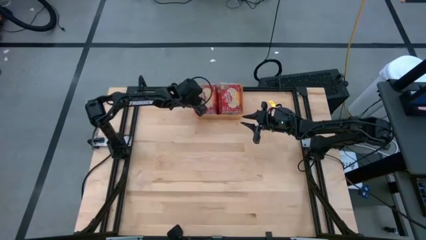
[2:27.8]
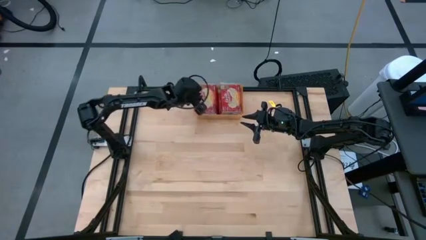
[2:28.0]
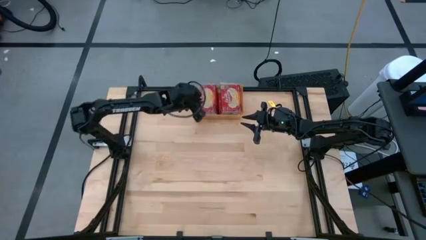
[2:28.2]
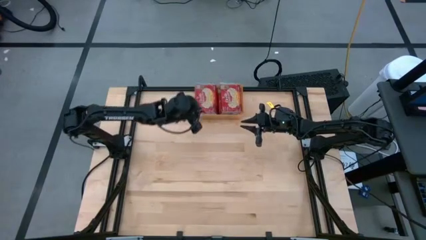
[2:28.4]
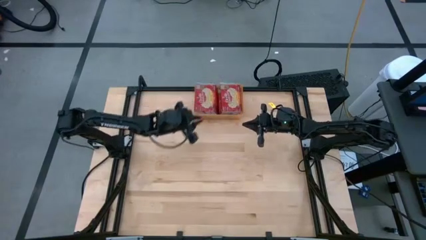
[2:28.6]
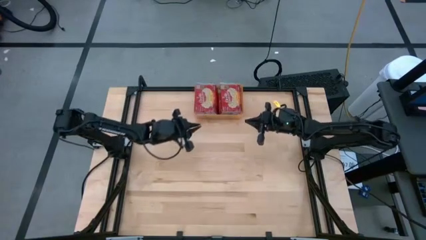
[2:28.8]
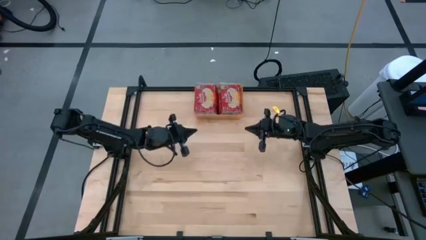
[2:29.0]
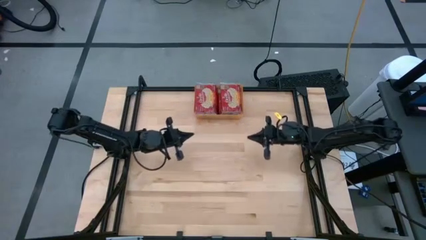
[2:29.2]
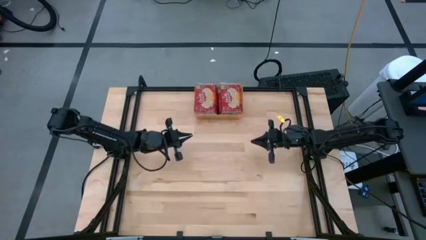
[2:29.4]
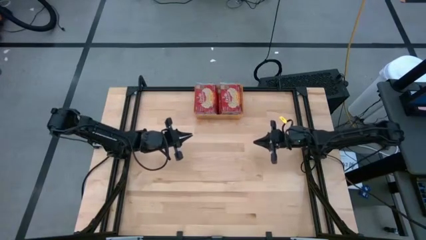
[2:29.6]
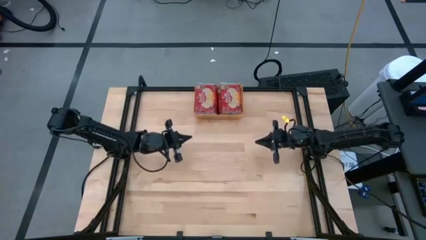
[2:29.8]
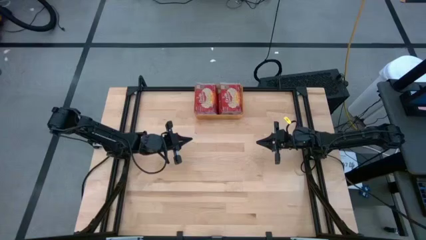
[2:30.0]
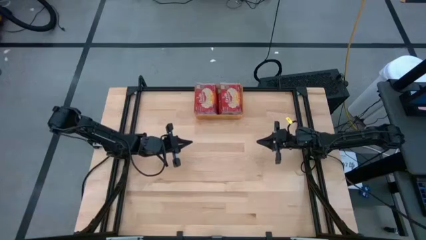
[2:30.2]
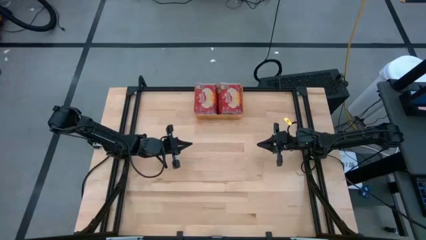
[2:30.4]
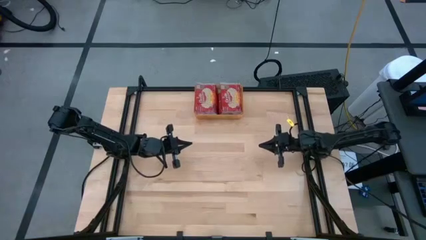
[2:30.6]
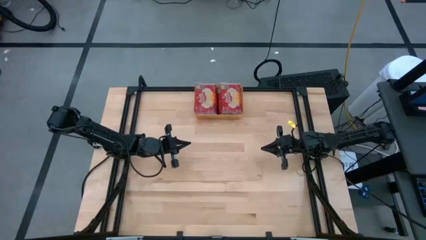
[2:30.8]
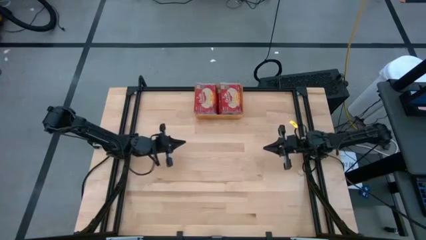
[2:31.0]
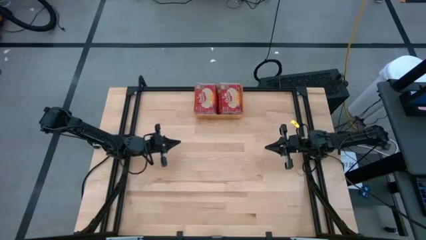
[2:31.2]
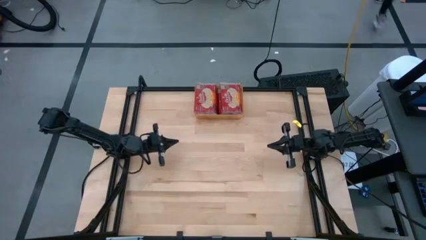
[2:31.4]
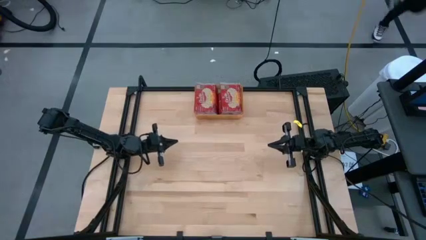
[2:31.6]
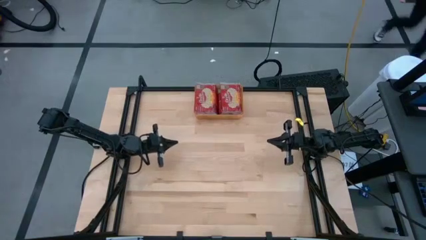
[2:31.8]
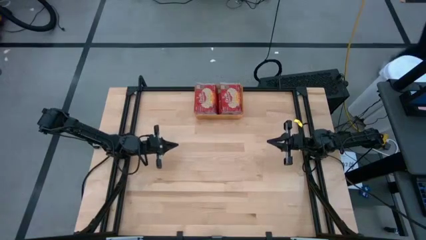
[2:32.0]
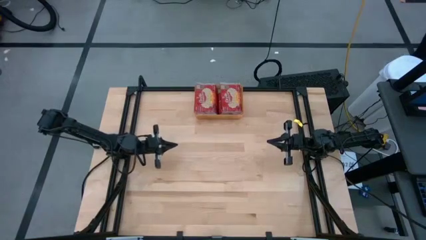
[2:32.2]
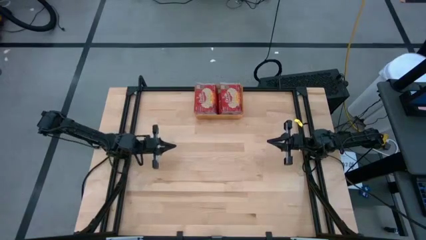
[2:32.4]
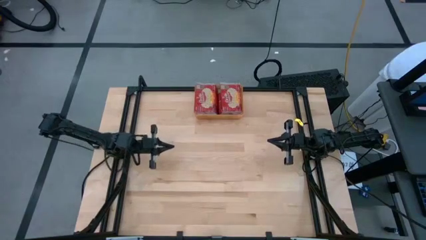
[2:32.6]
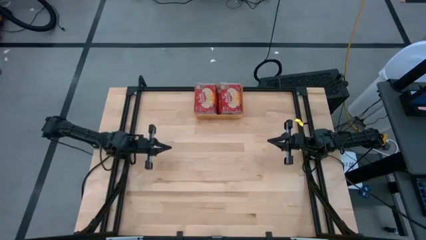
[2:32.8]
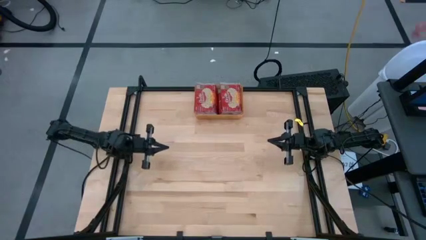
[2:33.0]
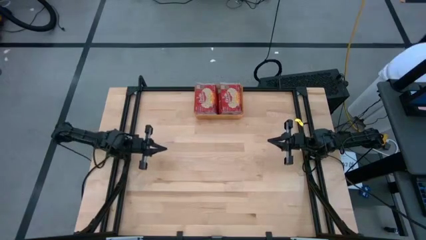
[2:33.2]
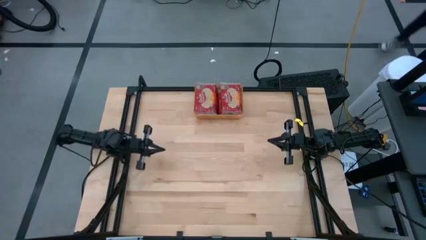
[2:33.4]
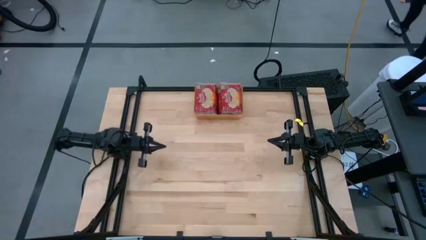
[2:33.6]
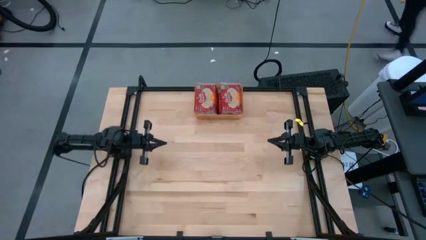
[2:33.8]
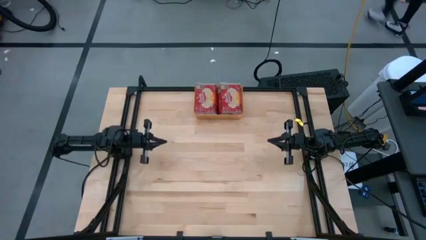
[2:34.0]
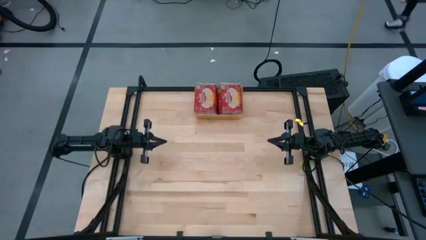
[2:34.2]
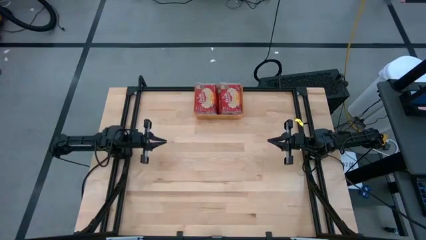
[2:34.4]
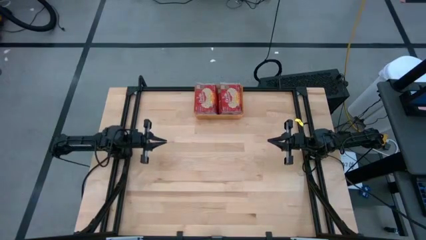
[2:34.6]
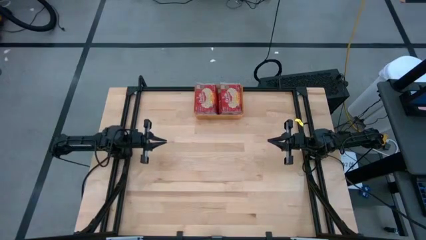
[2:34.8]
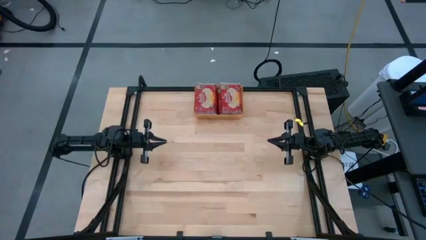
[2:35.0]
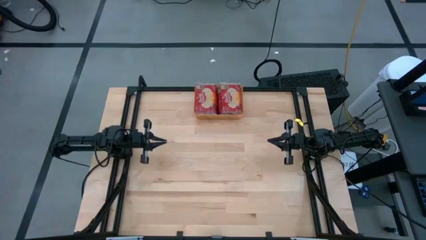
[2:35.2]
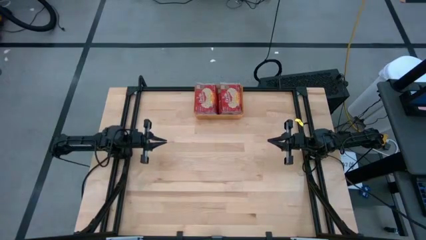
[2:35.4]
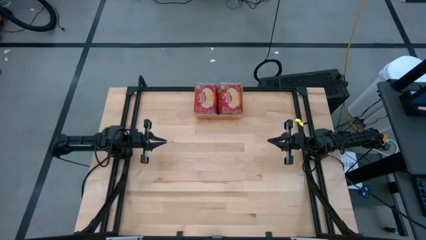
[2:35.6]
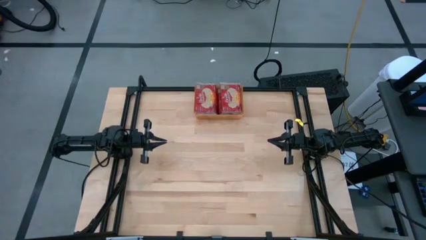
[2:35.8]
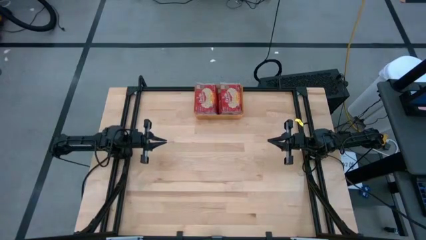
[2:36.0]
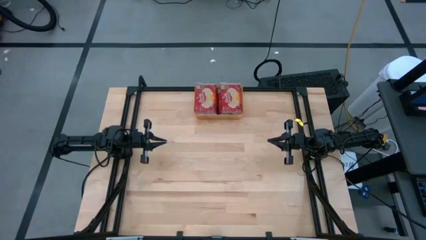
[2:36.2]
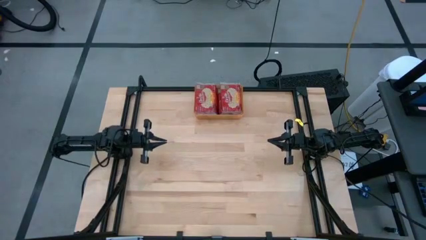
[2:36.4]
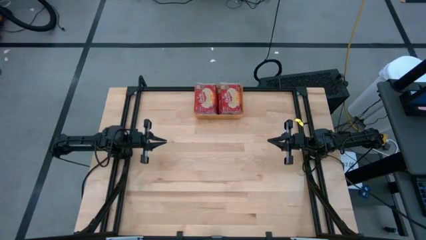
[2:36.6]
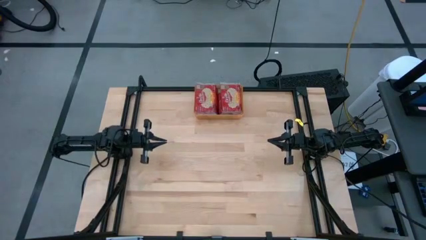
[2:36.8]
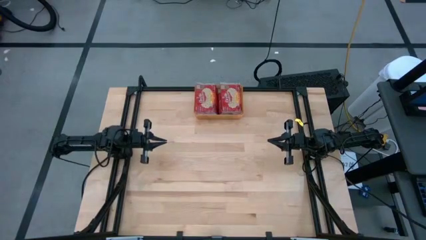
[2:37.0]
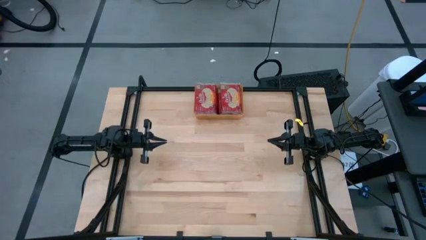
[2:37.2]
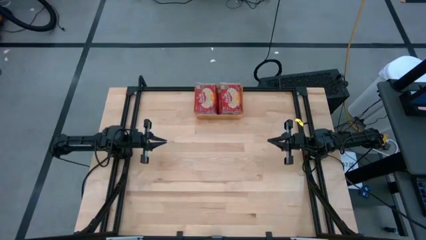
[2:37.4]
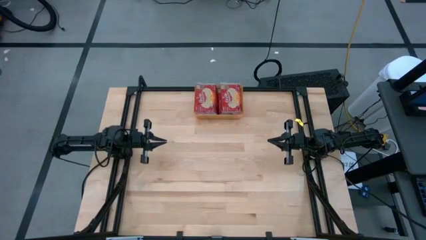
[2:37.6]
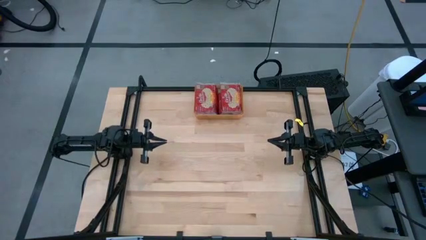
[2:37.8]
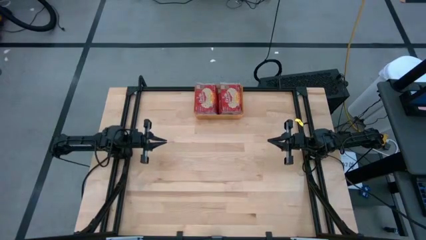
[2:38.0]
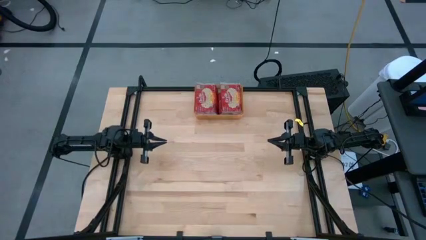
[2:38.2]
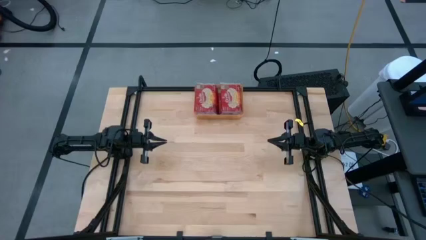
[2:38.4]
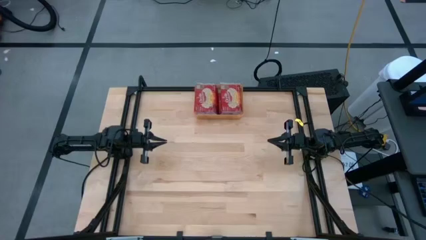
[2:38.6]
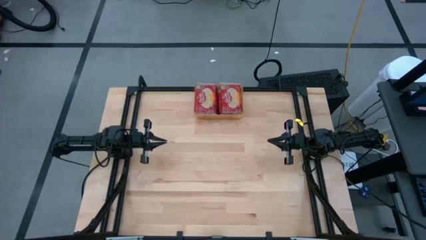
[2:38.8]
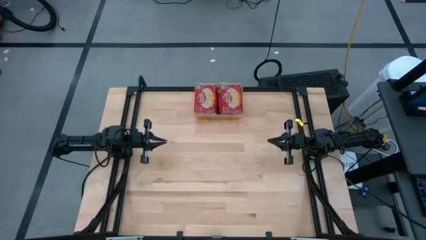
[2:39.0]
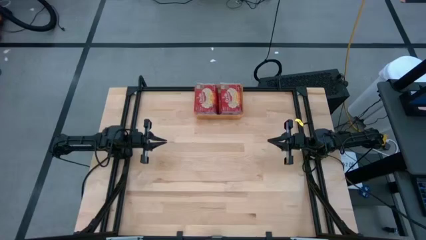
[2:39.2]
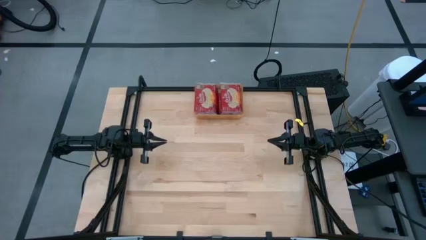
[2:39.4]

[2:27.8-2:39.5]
Task: Sort popcorn bags into baskets
Return to Home Position

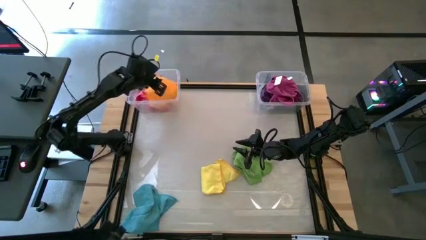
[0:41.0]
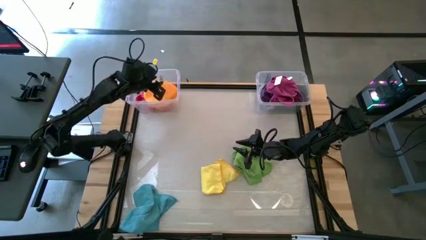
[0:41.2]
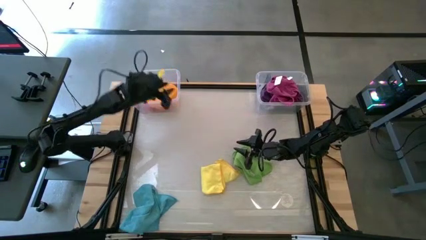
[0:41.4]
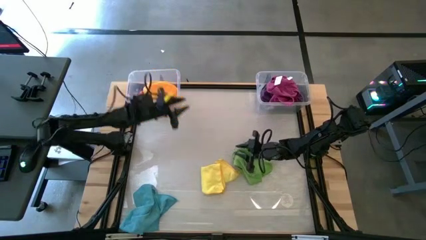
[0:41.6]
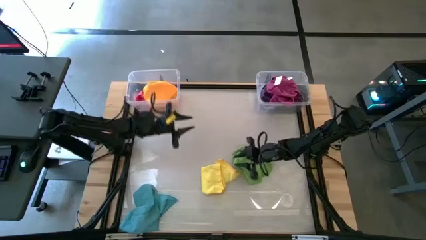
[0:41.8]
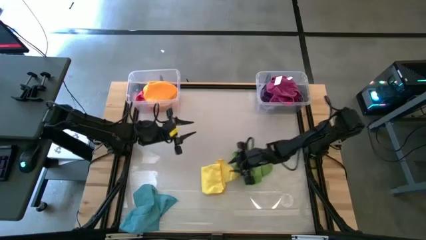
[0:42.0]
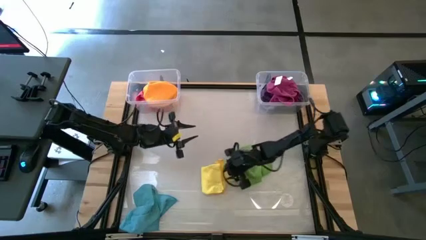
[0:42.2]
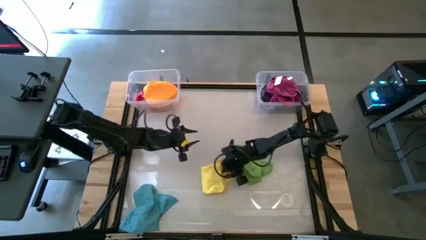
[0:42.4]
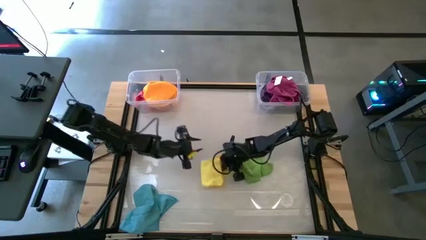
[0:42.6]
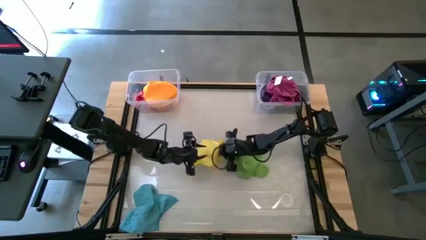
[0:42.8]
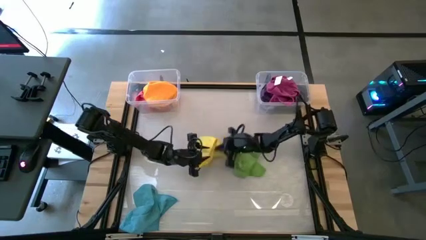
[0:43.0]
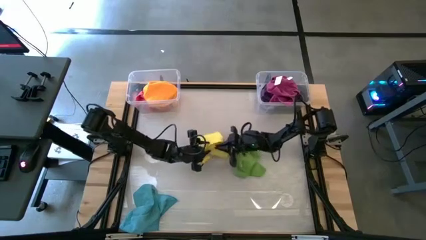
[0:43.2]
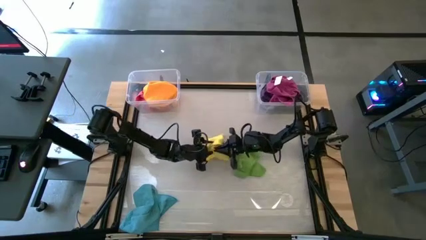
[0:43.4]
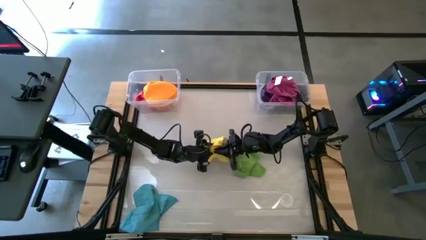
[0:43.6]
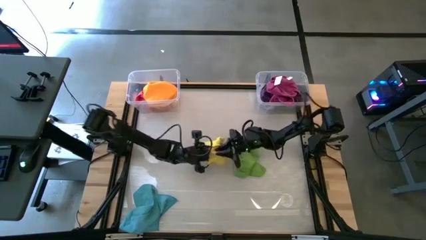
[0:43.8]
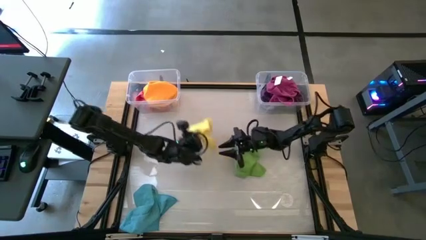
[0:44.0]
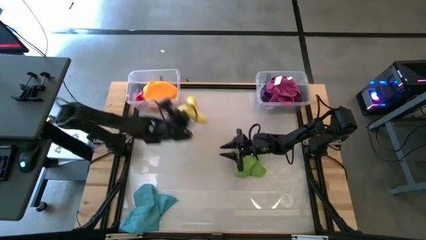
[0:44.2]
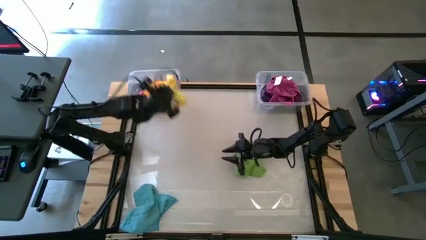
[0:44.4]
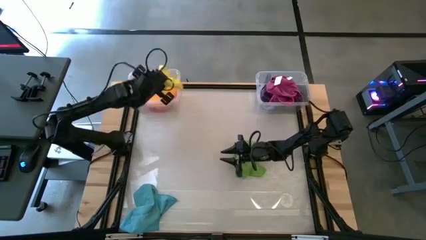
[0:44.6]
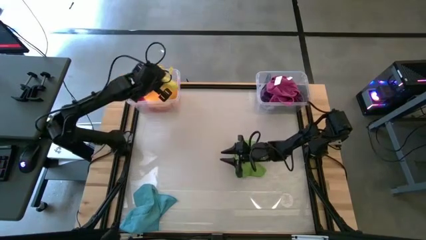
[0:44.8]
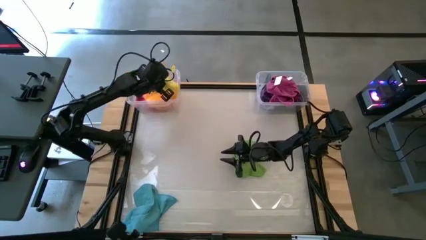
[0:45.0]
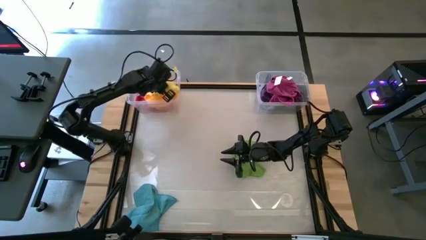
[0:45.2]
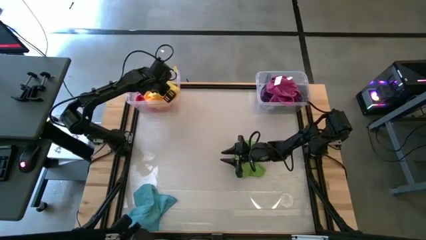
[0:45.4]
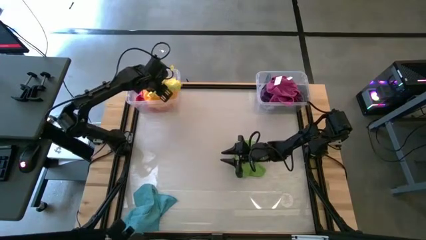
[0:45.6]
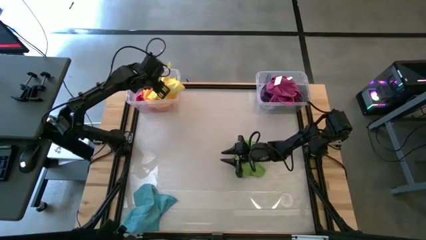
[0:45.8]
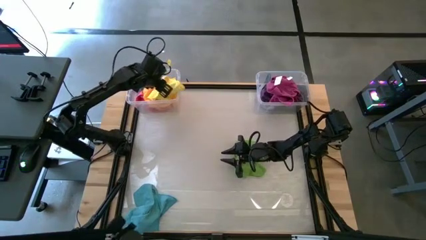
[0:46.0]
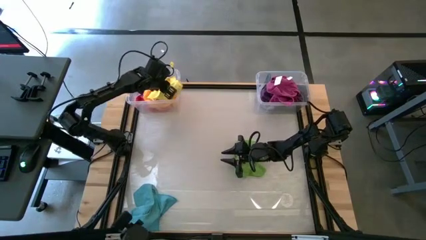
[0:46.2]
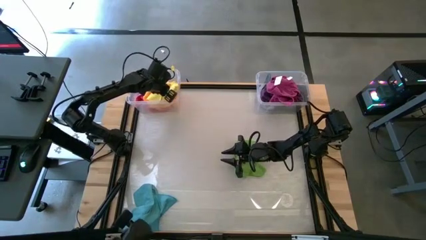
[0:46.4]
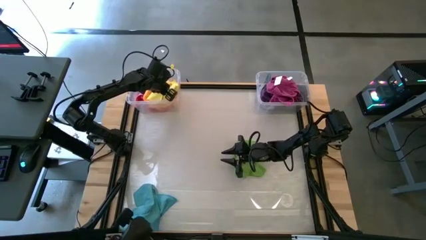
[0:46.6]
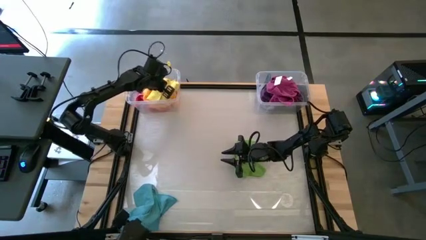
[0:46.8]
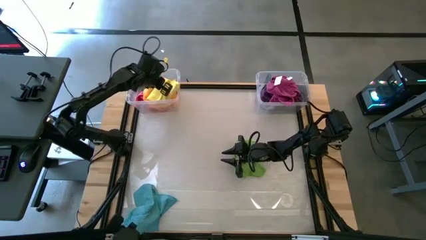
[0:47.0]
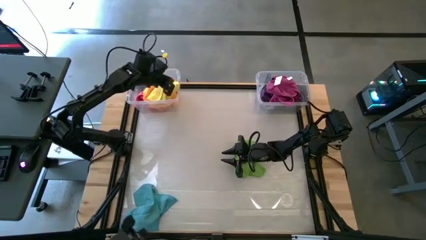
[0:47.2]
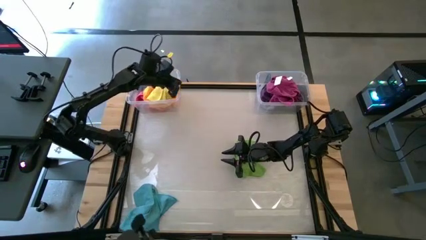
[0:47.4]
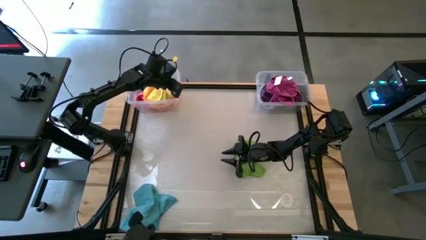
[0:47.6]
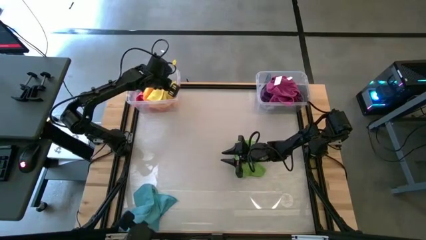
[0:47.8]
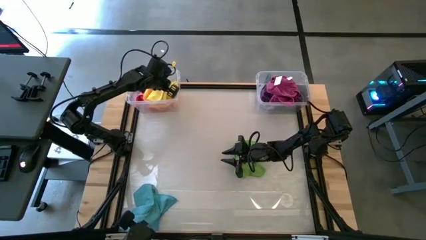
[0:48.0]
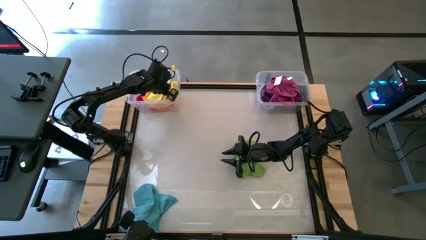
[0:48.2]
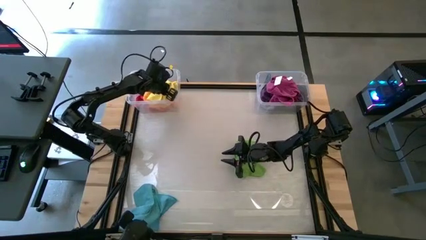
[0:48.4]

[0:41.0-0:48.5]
Task: Sort towels by color in basket
Put the yellow microfiber towel into the left transparent bin
